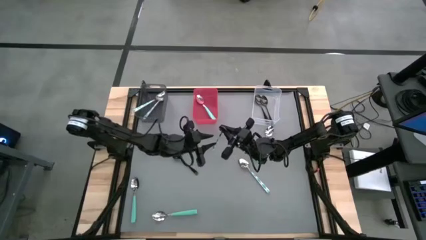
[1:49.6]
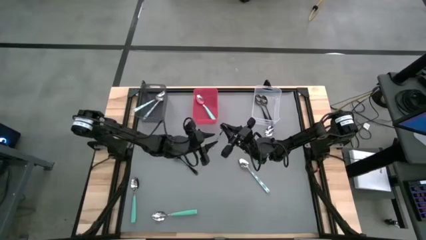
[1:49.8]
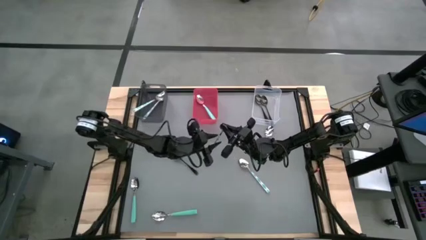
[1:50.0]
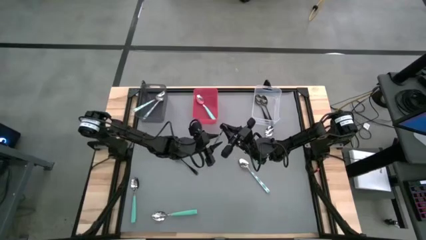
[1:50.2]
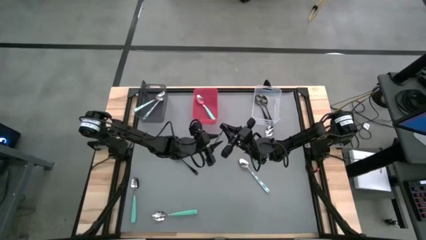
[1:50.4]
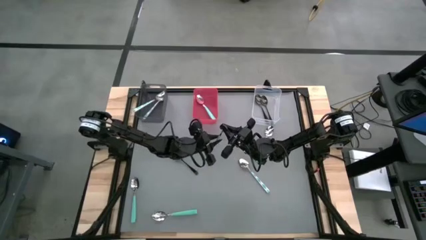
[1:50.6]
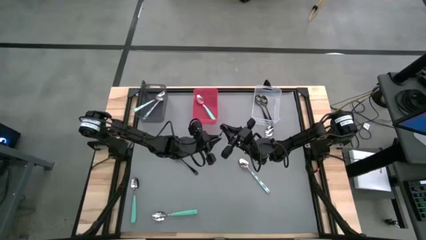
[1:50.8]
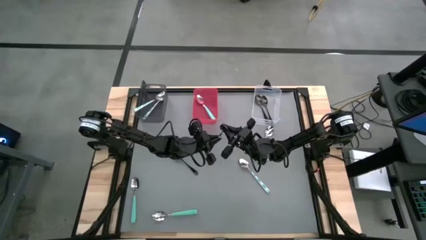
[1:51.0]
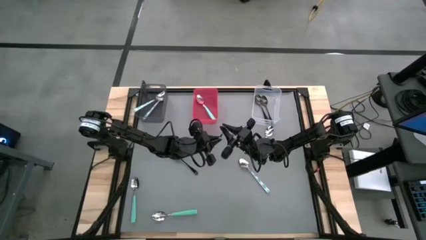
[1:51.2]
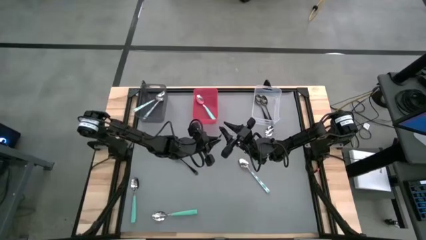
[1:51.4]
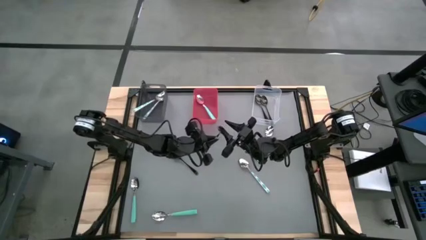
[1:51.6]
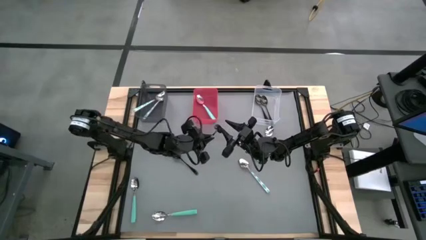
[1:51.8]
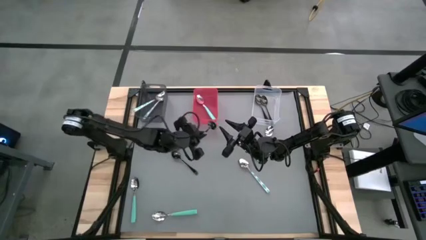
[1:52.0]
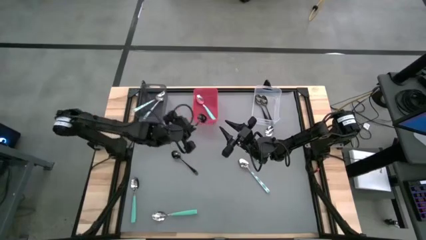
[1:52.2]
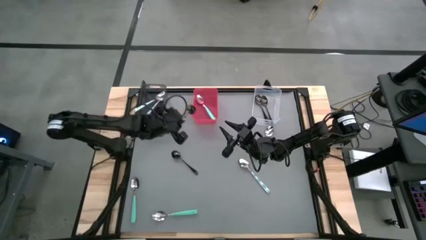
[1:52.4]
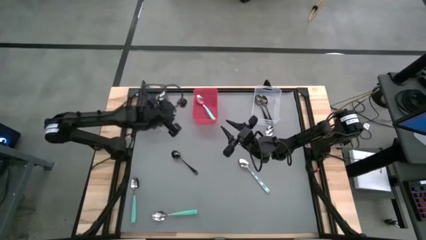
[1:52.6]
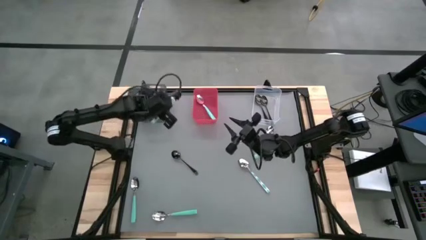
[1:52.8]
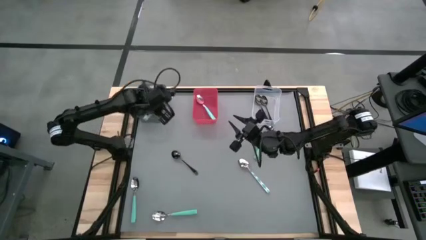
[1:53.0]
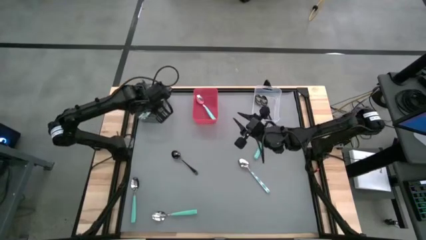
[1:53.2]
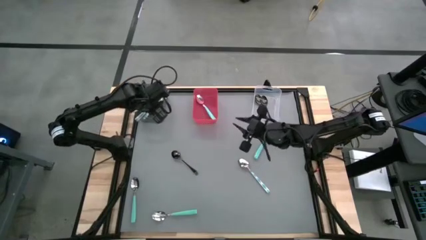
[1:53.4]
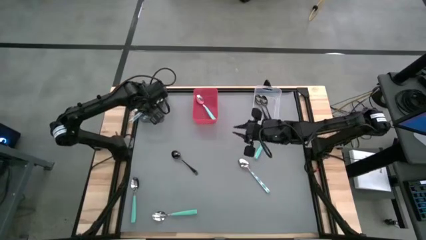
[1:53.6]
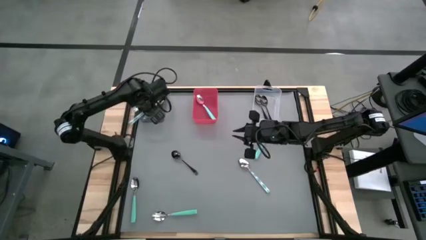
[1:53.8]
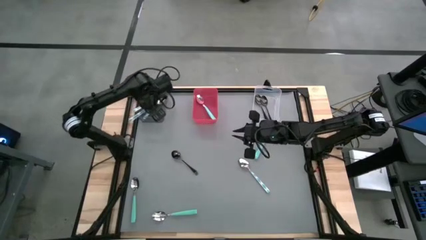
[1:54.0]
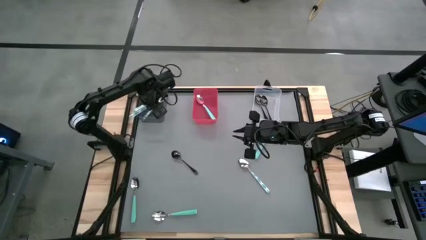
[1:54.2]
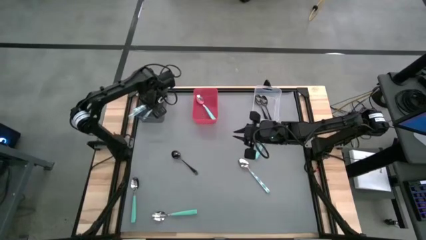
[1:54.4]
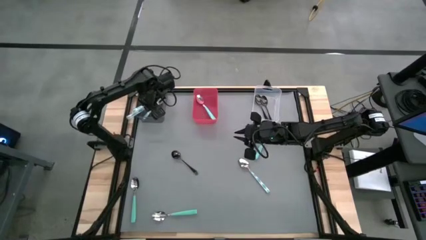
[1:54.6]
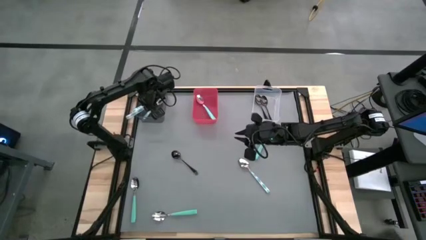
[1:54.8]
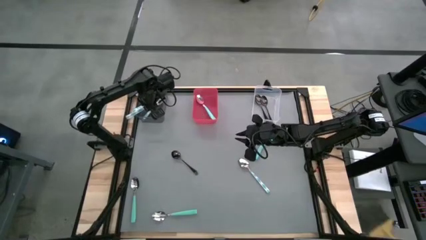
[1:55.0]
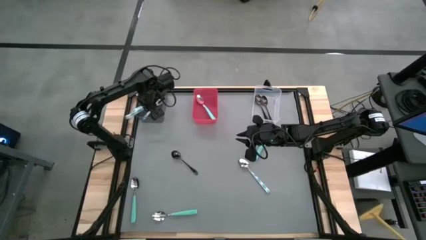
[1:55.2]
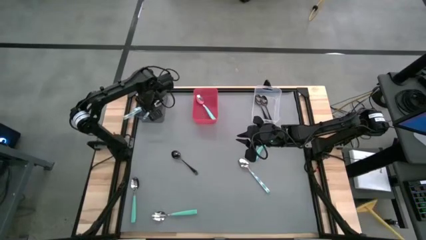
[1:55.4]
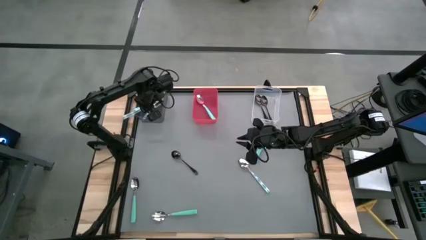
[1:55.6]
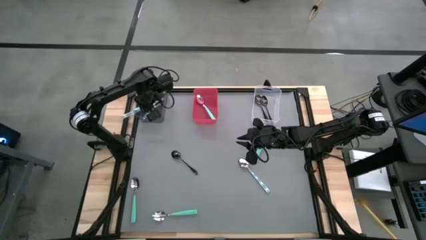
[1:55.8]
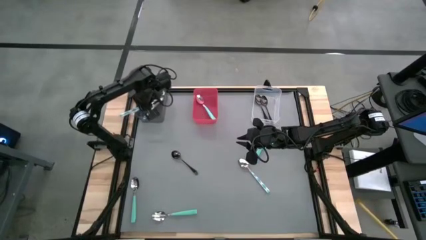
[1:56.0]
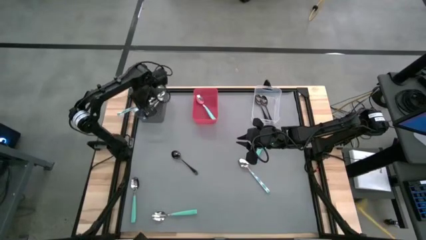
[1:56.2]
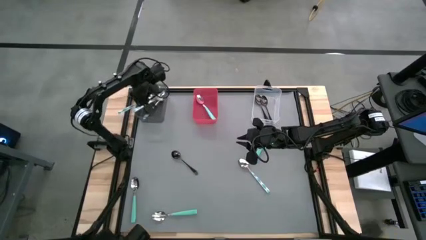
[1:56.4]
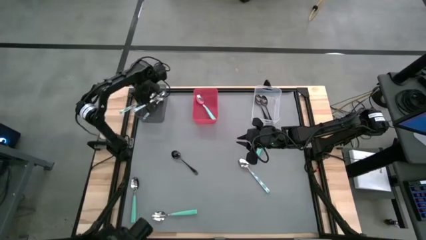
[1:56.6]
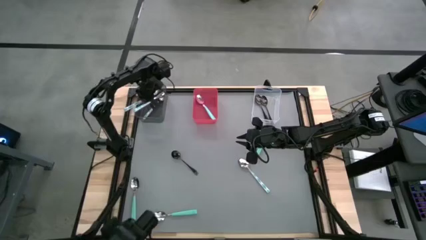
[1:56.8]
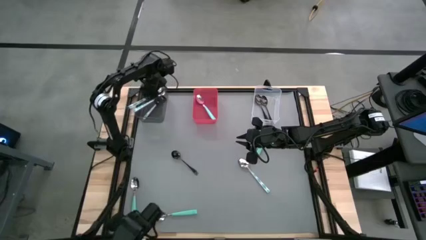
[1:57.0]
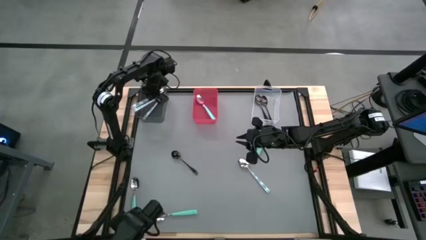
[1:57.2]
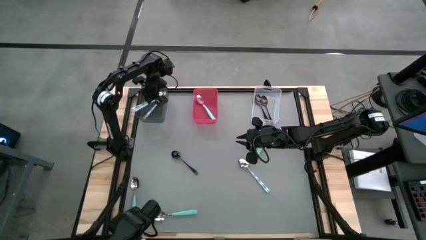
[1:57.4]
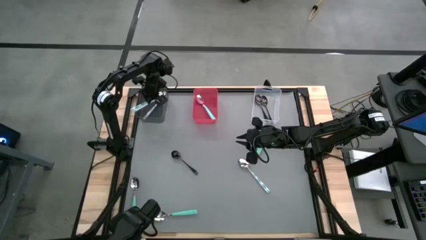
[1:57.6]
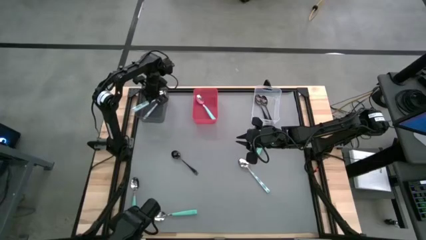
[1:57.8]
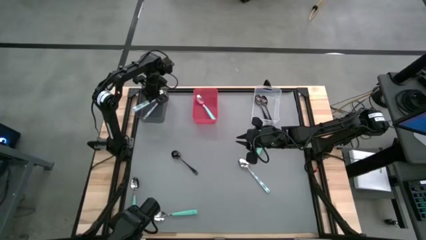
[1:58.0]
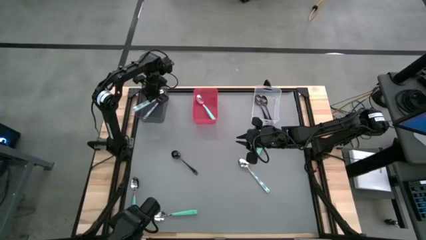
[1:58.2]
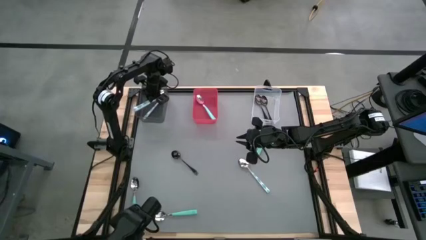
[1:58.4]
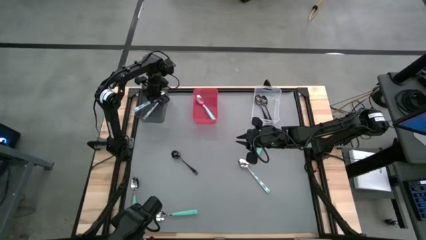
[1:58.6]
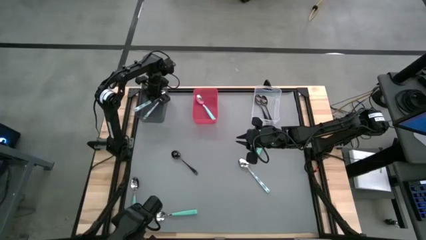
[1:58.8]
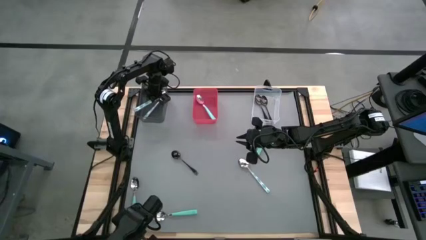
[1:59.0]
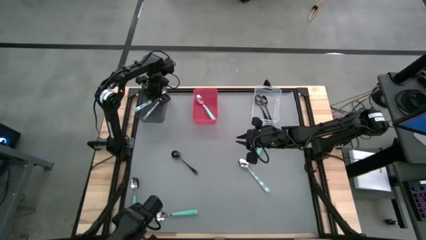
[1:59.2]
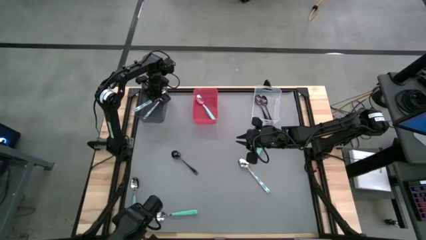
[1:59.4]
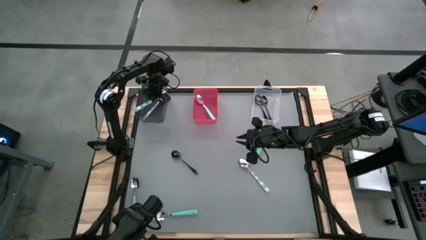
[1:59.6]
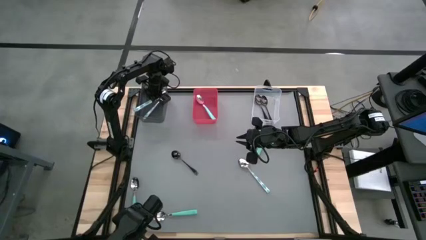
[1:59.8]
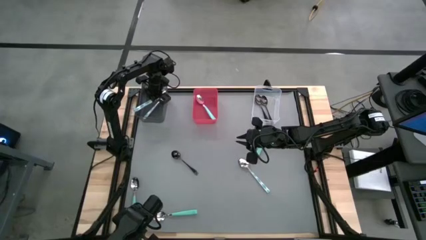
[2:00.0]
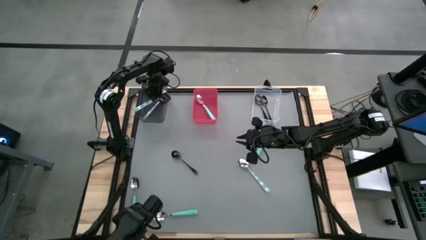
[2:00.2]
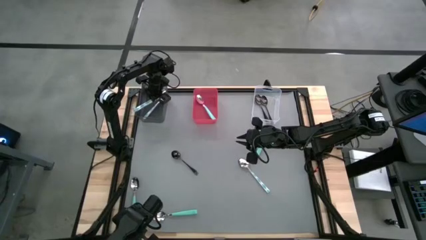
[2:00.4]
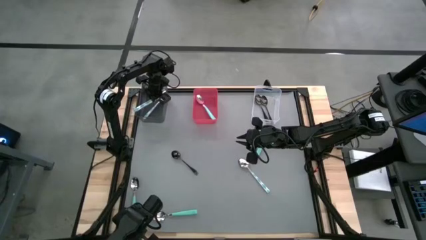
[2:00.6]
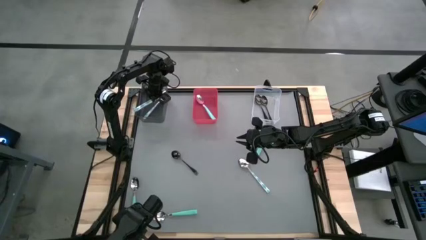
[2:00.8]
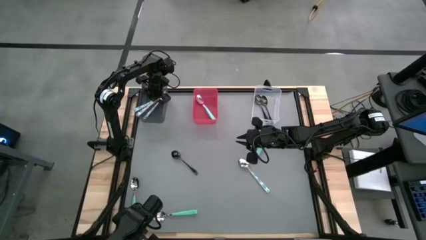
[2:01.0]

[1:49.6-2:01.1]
Task: Sort silverware by color (type)
Put the blue patterned spoon into the black bin

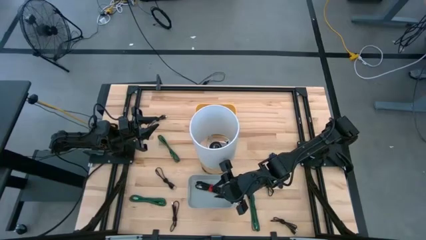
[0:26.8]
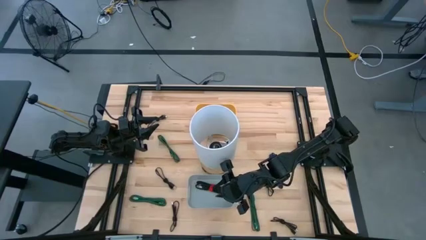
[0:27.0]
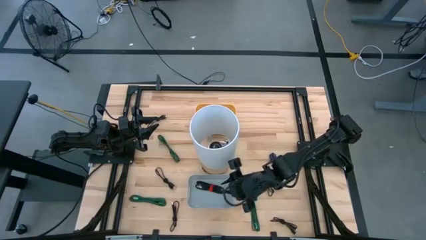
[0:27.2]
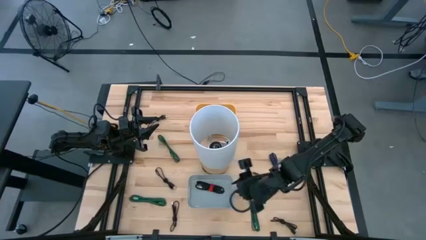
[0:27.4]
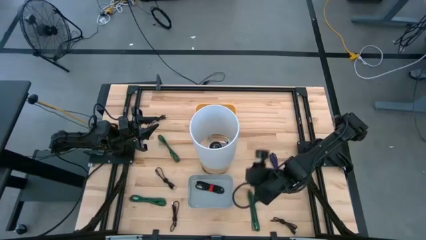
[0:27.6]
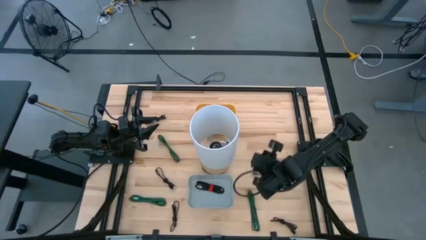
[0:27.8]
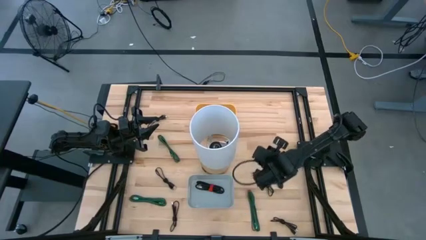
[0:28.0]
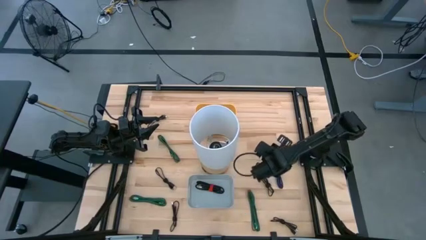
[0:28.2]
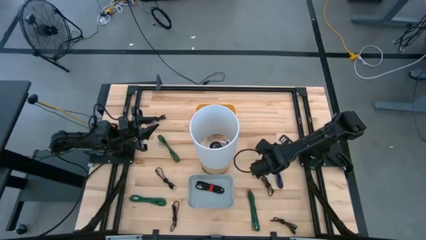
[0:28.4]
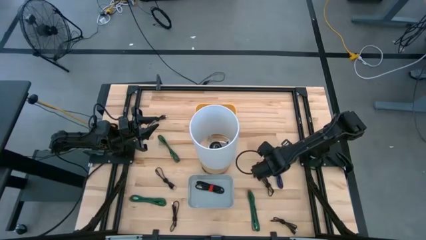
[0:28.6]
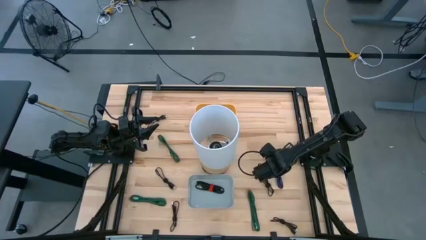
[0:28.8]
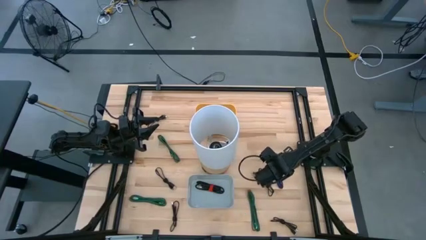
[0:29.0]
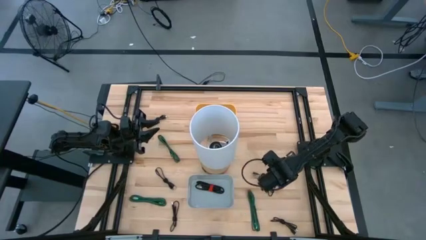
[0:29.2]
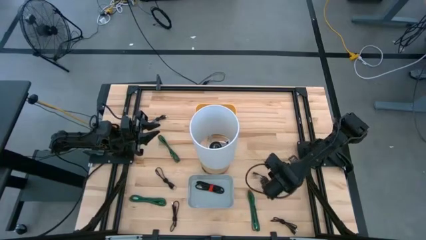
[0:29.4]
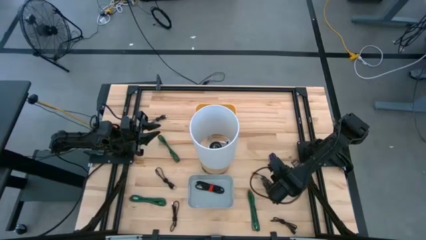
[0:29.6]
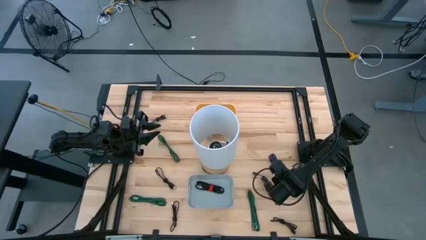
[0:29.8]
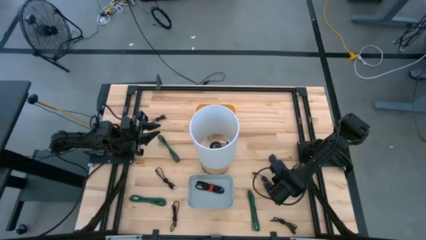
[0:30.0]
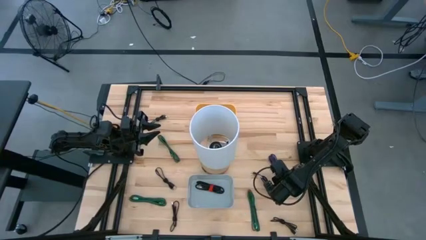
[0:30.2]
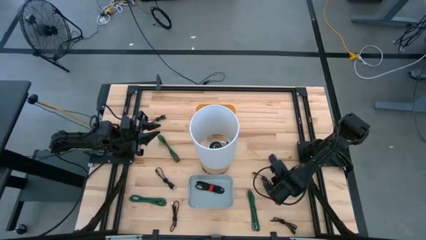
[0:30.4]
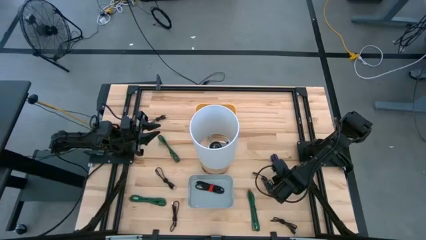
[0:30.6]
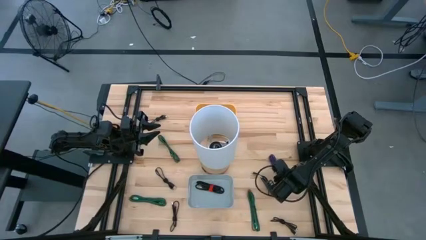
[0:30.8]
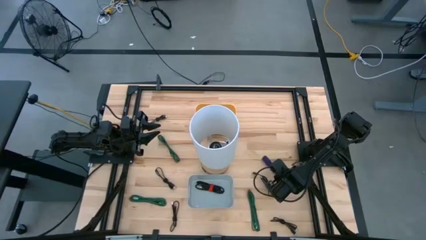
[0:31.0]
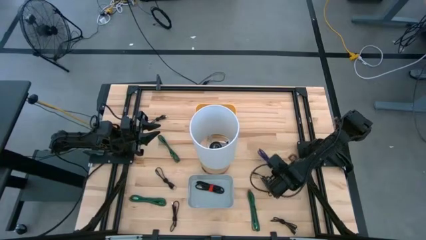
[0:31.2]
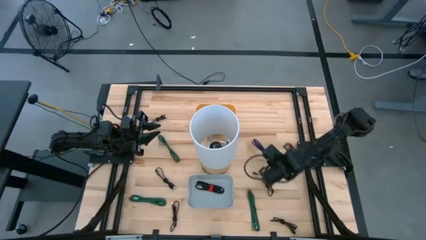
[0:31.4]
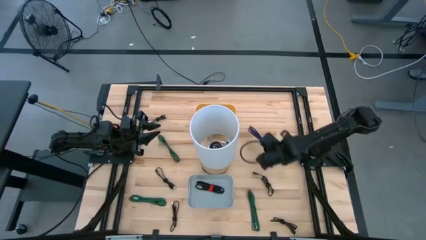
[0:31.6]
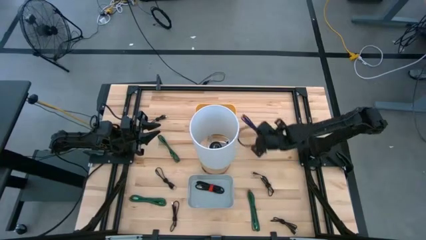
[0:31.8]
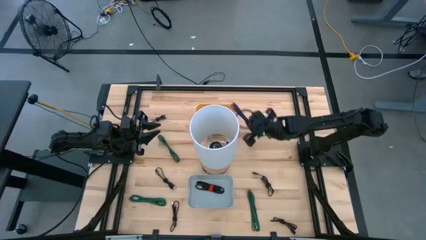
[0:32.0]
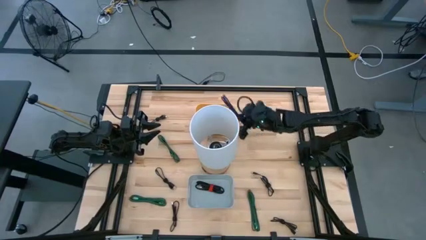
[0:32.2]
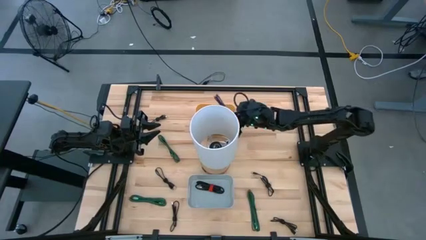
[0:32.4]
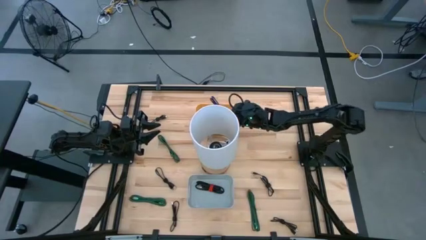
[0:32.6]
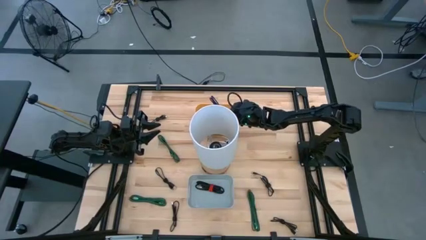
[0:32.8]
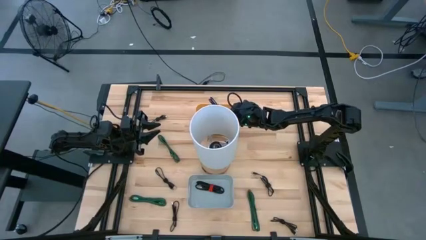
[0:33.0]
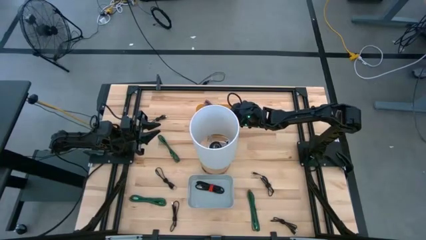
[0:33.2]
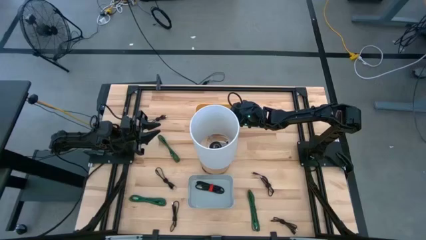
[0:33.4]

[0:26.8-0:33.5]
Task: Pick & Place USB Port
Put the purple charger cable into the yellow bin
